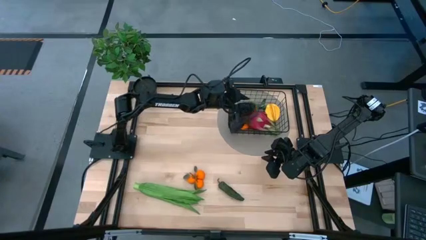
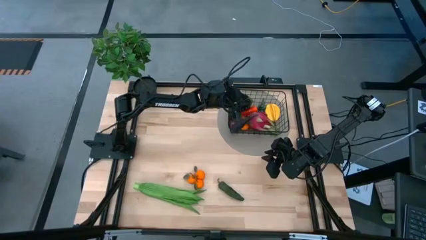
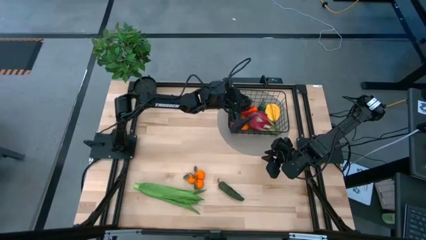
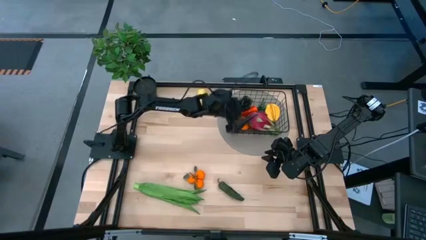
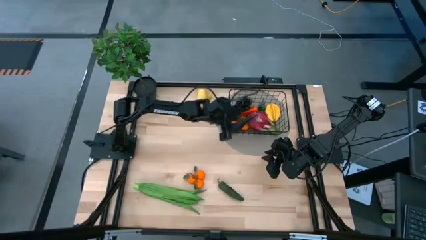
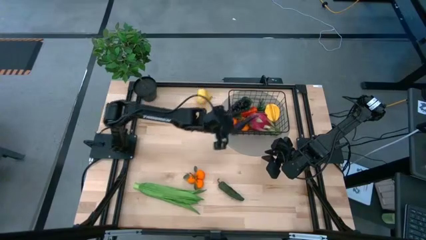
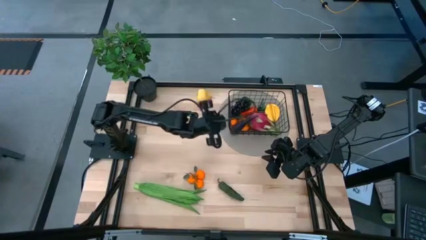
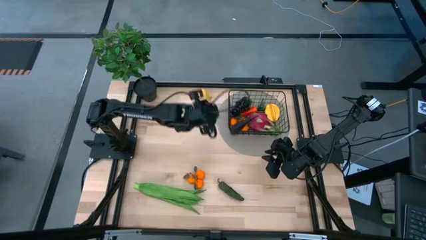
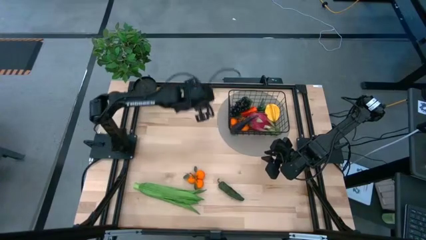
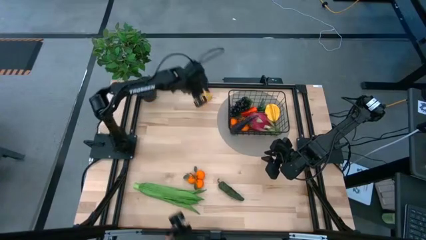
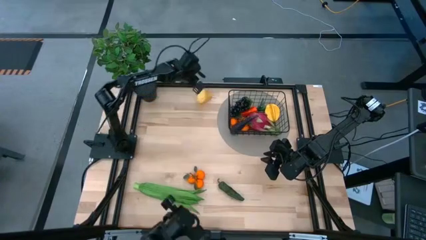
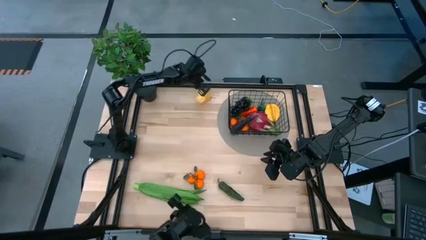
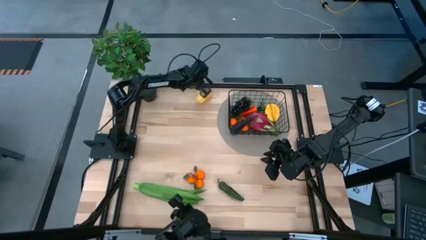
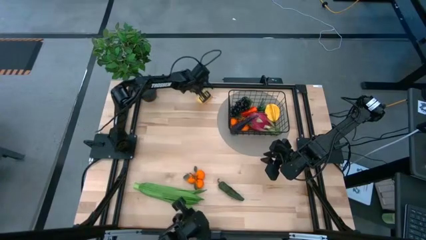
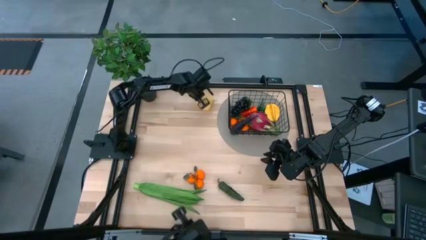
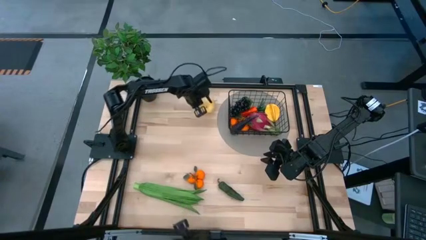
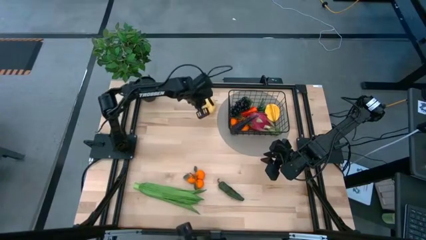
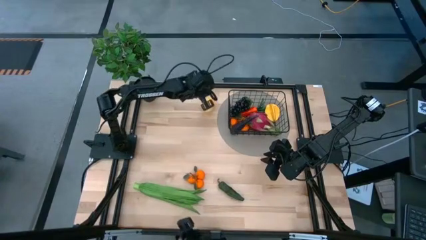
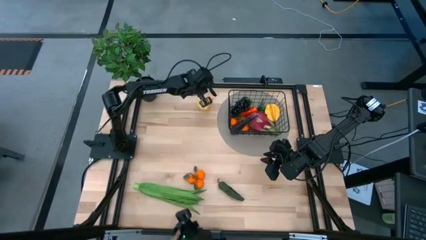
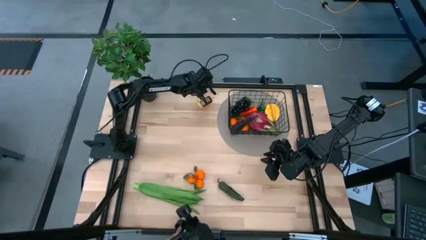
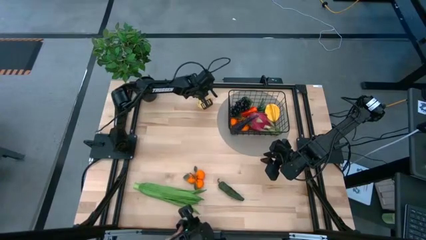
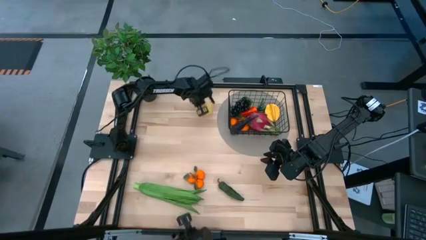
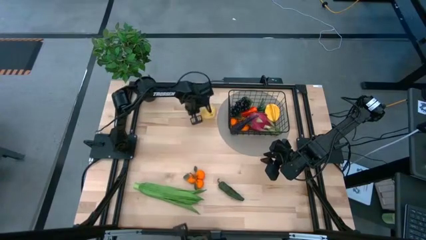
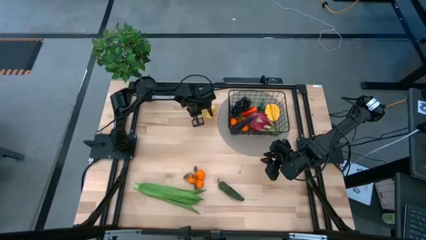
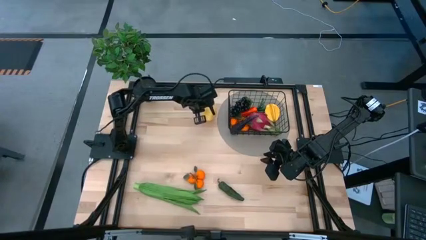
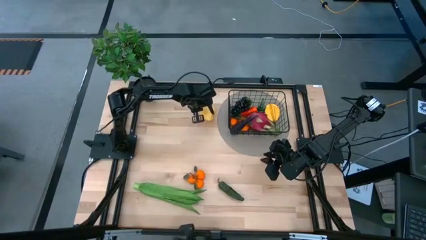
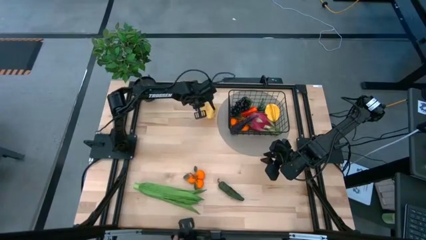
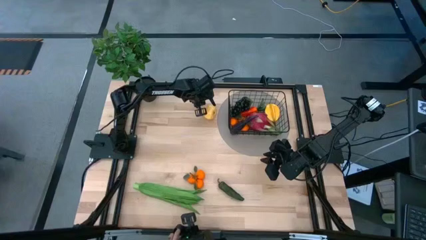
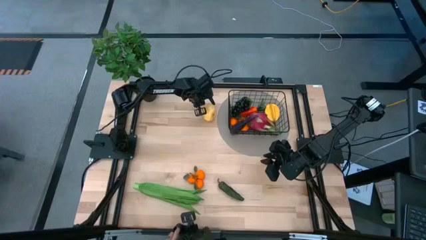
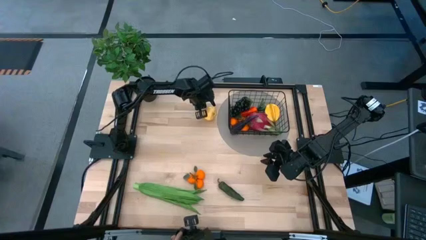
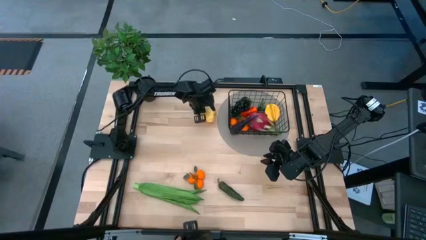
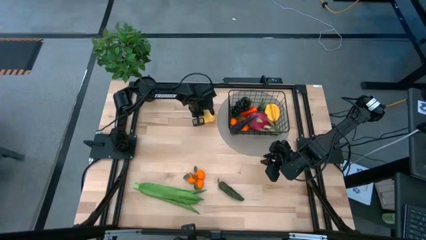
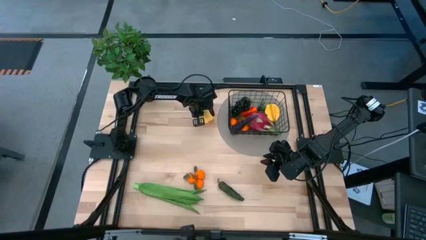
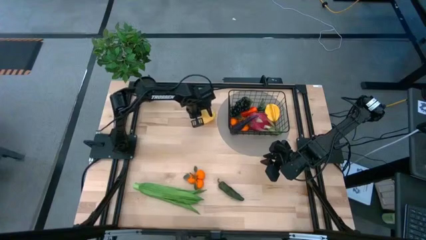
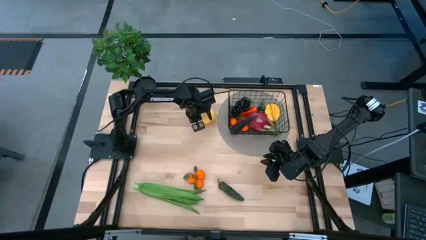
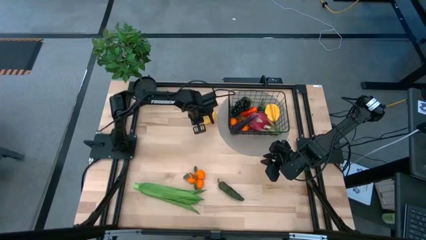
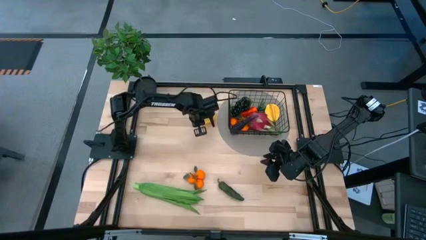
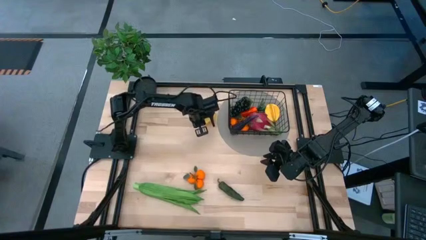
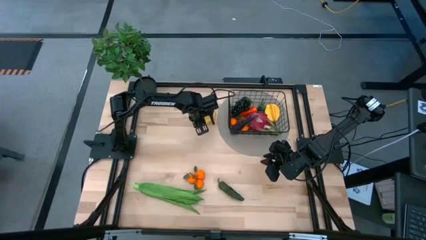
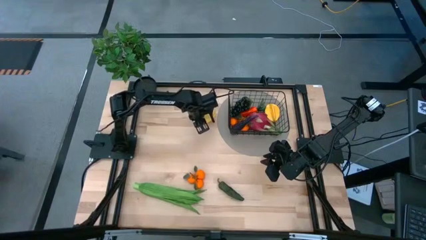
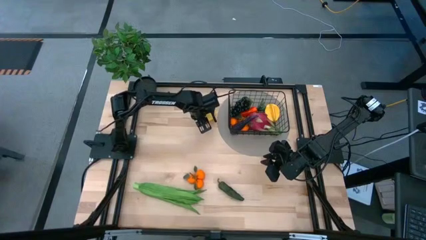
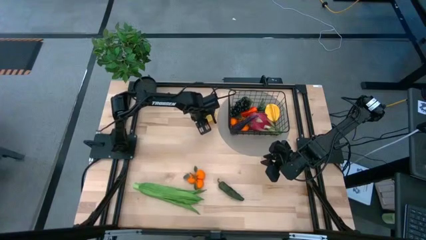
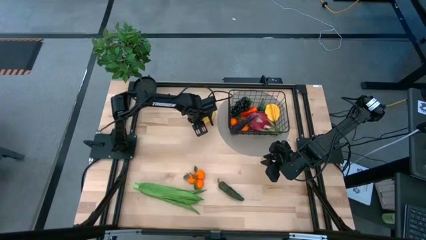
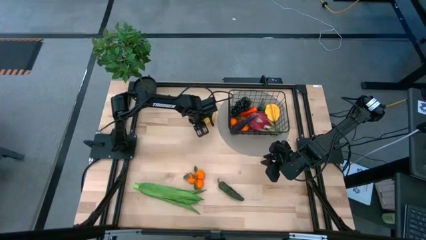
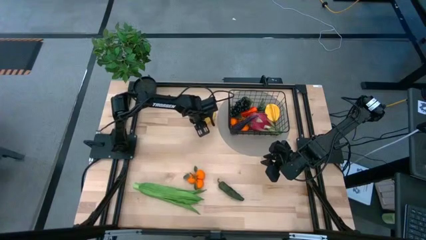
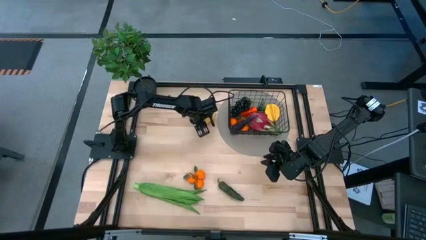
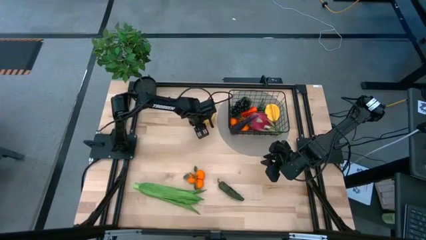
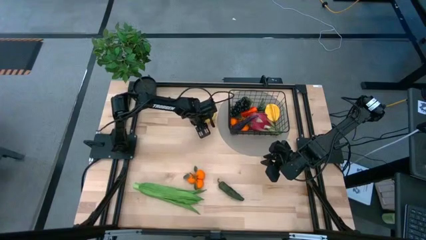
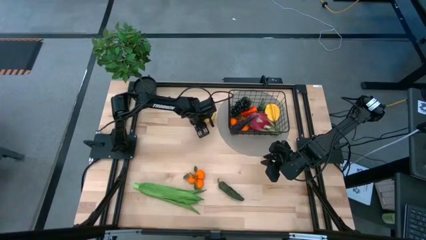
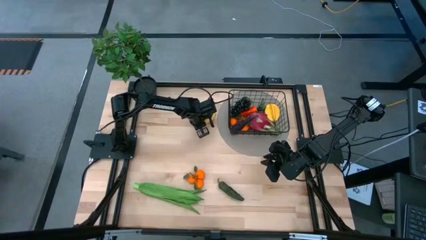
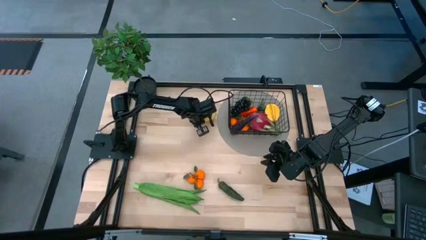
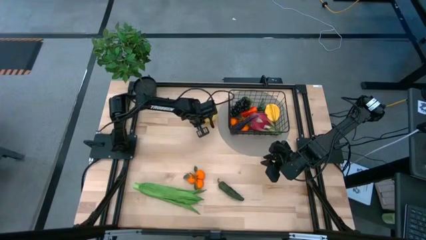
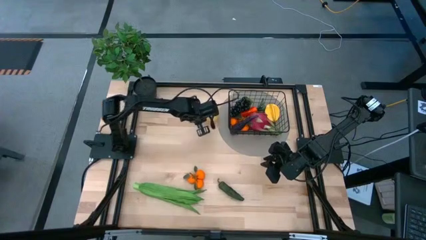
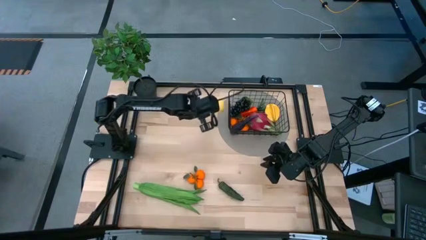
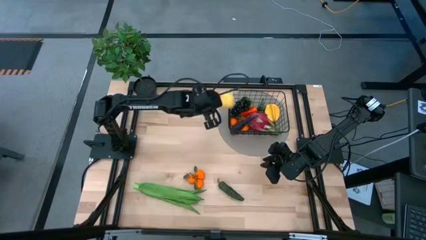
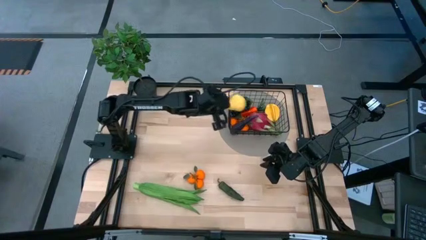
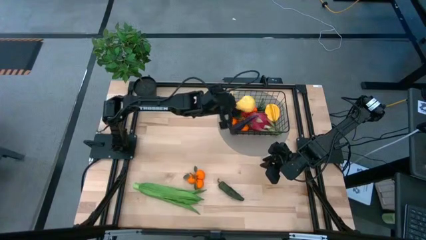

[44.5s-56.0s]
Task: Build produce basket
Put the pear into the wire basket

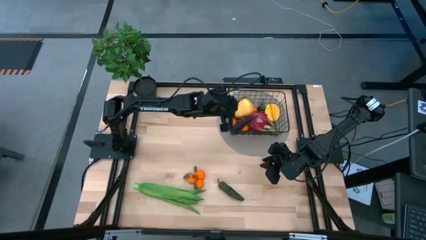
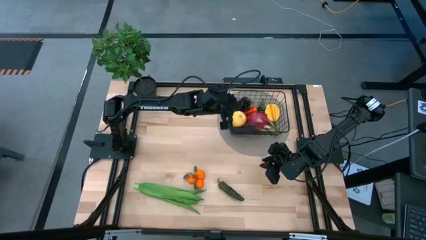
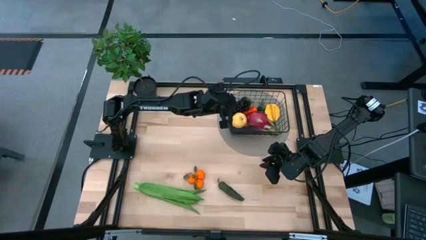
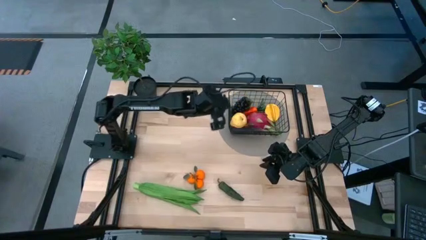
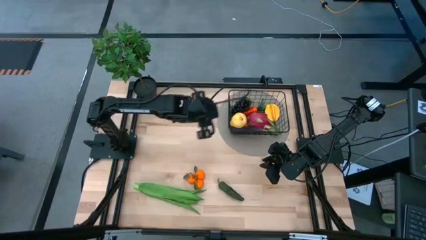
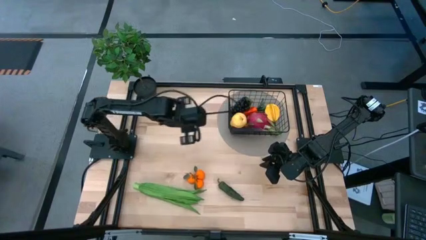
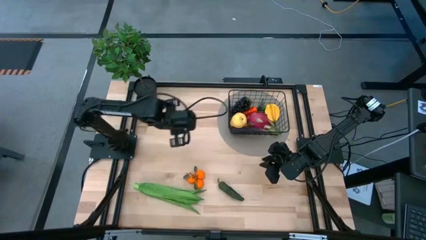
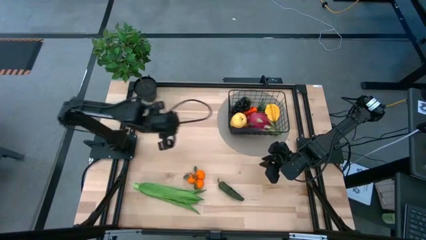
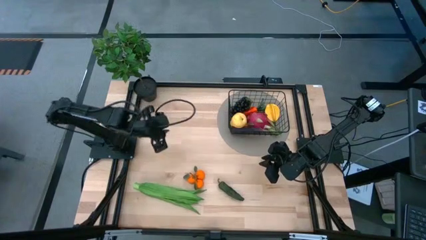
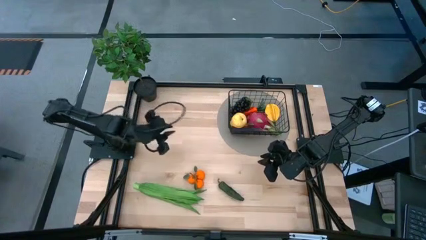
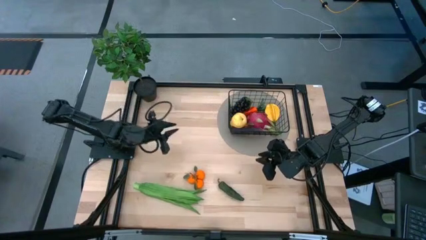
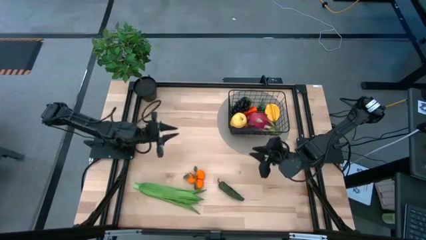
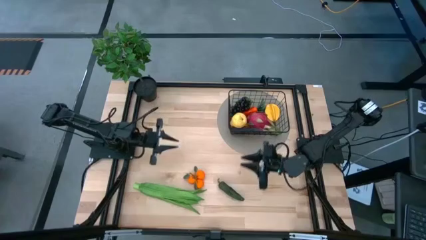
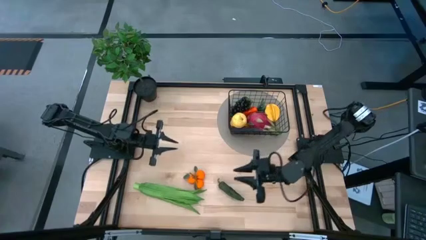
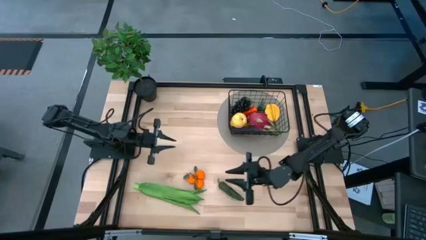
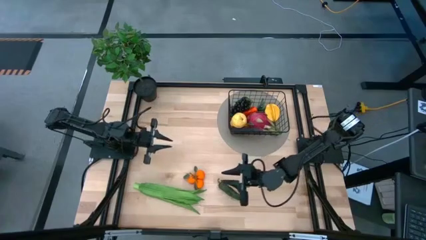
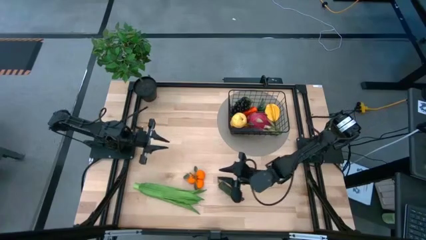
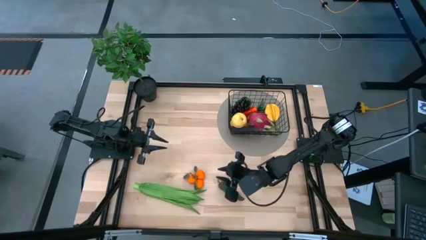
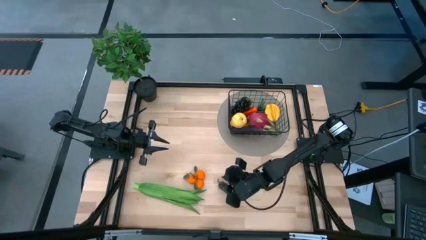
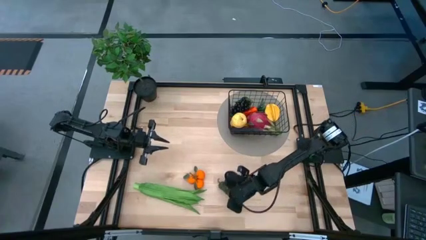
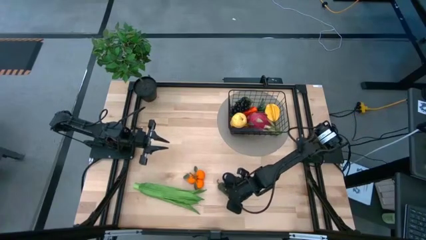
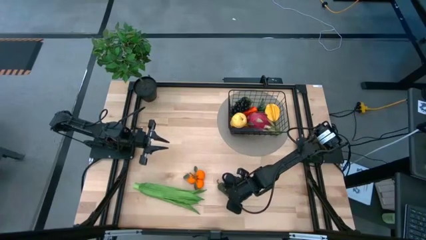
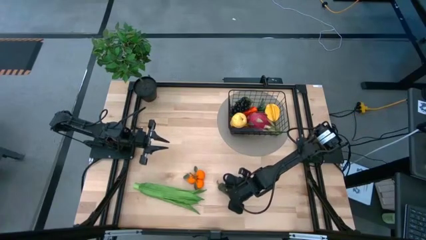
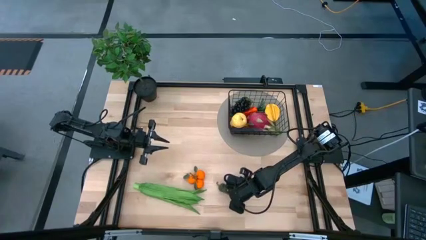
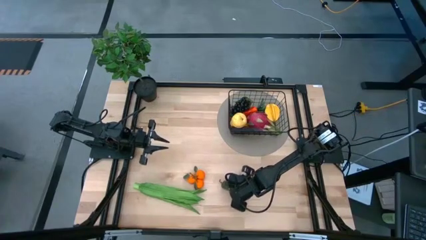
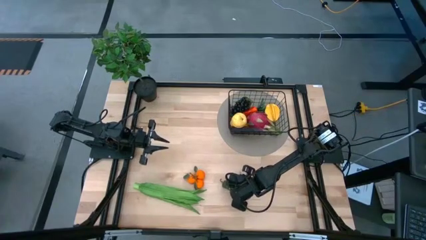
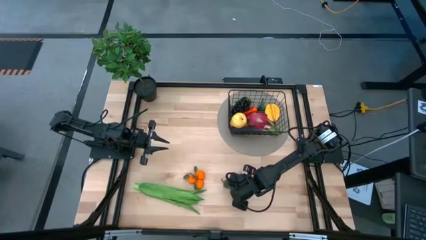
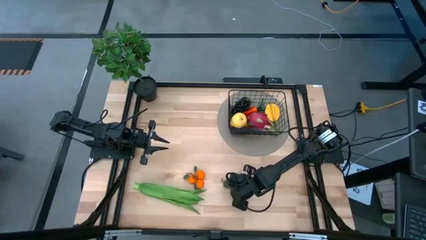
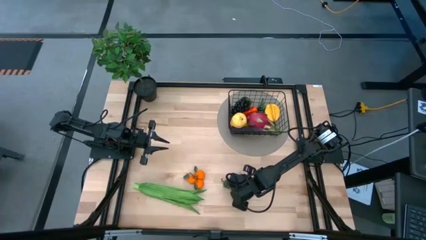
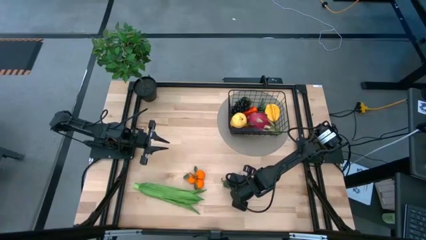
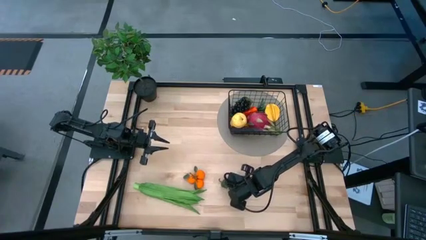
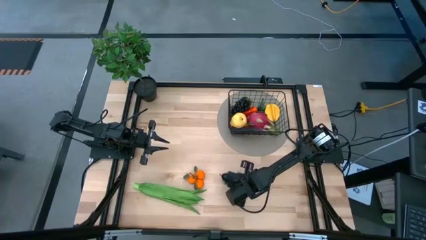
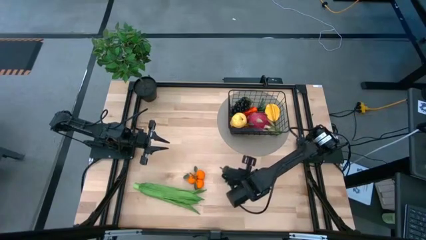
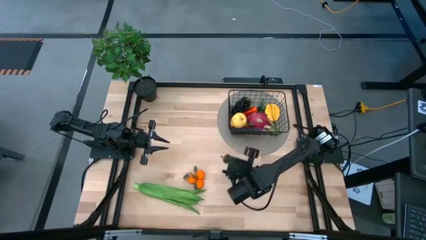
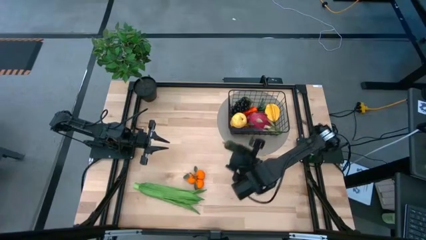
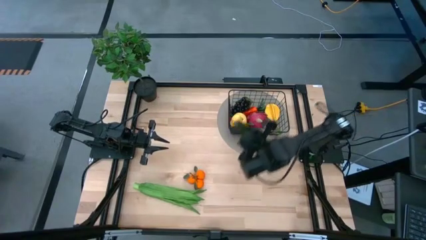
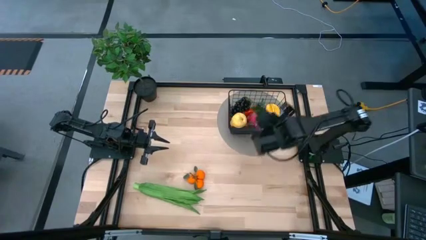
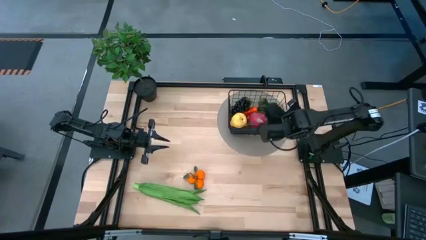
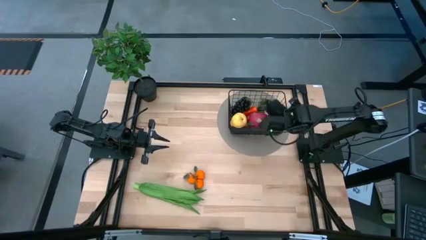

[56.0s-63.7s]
Put the chilli pepper into the wire basket
